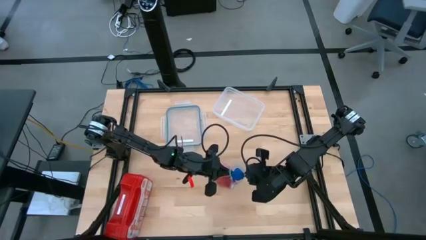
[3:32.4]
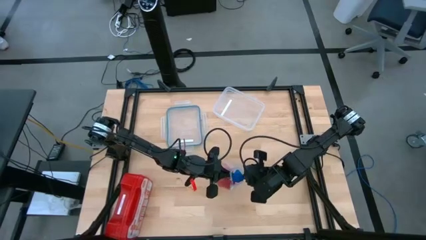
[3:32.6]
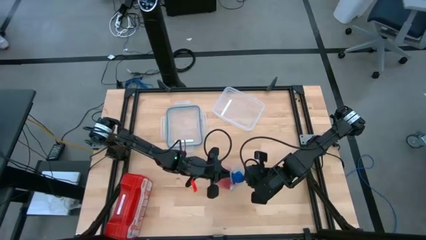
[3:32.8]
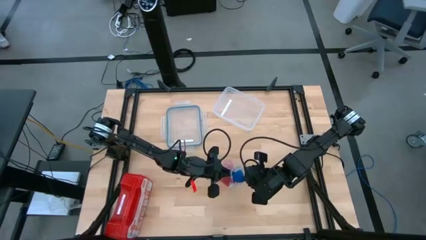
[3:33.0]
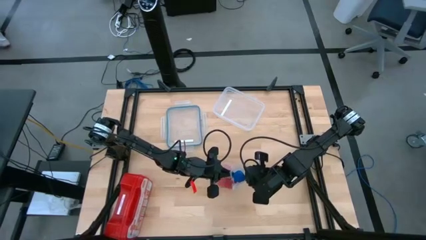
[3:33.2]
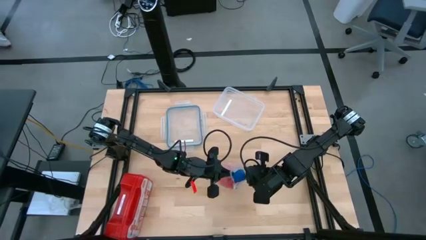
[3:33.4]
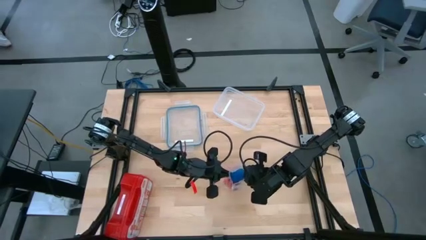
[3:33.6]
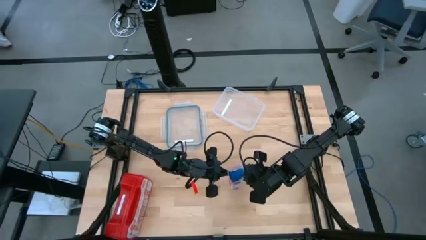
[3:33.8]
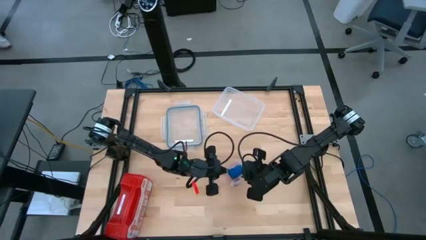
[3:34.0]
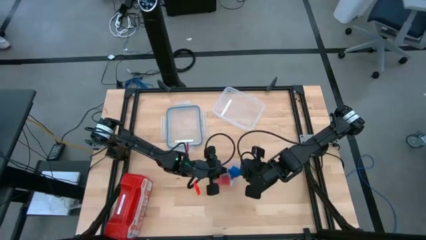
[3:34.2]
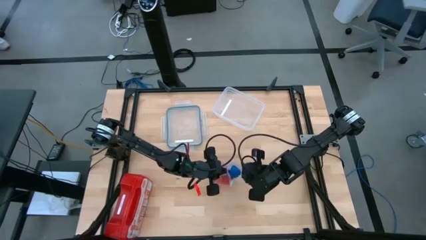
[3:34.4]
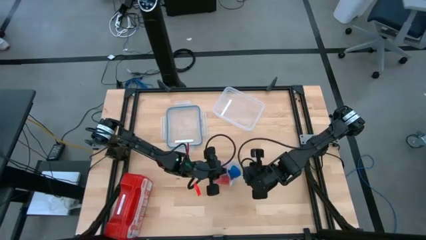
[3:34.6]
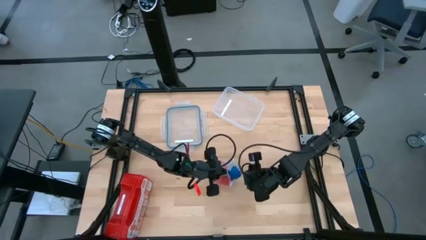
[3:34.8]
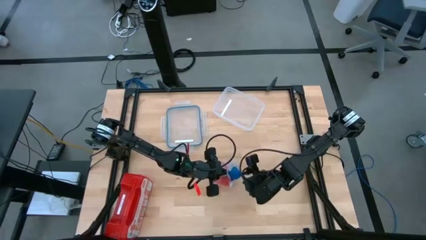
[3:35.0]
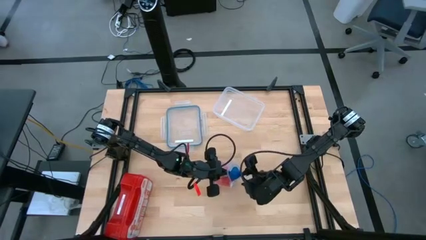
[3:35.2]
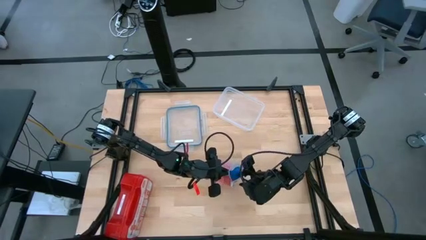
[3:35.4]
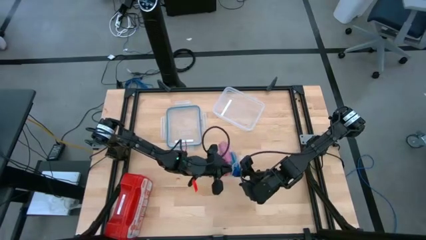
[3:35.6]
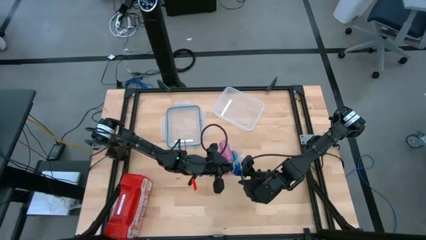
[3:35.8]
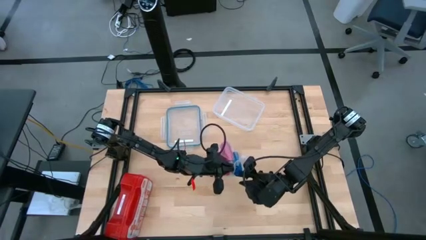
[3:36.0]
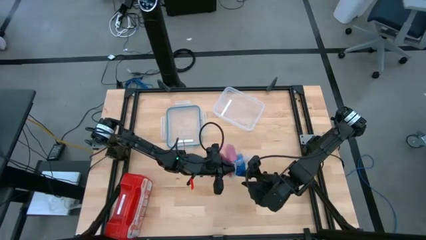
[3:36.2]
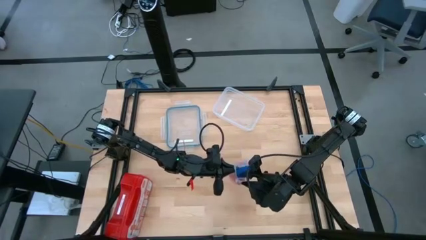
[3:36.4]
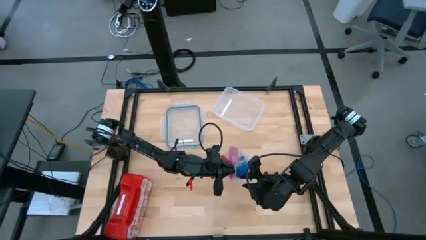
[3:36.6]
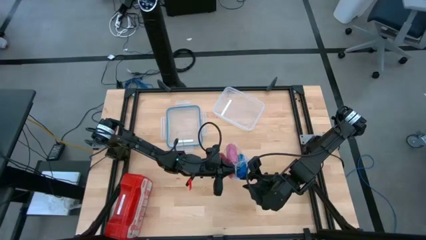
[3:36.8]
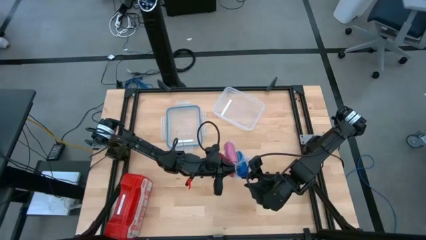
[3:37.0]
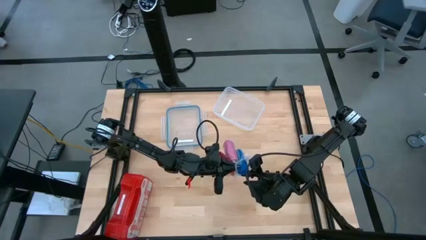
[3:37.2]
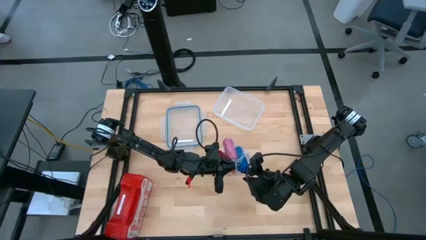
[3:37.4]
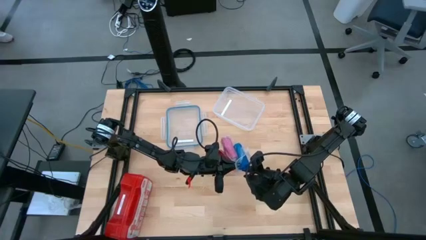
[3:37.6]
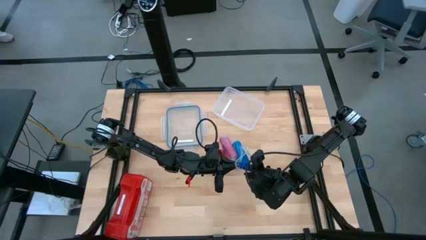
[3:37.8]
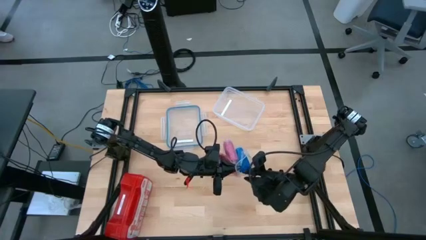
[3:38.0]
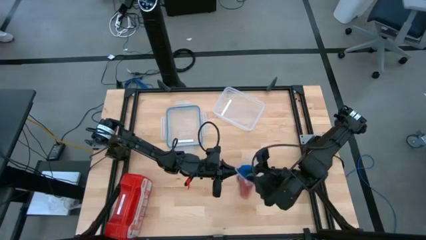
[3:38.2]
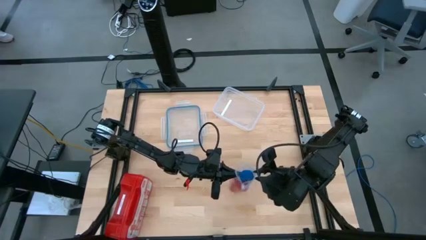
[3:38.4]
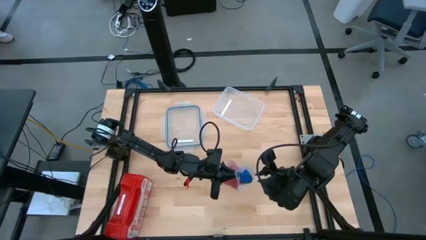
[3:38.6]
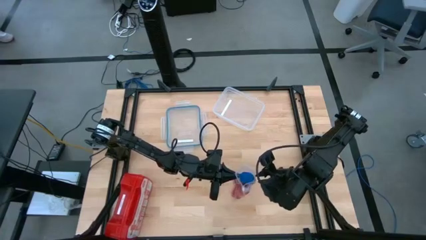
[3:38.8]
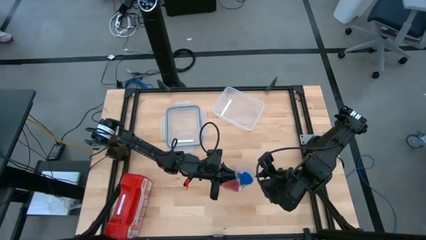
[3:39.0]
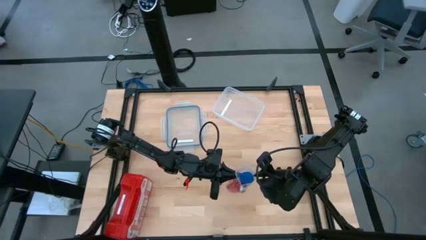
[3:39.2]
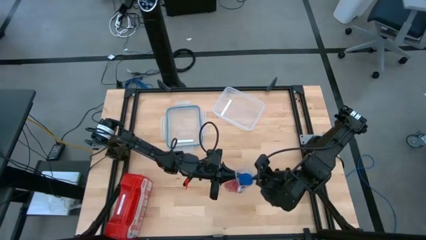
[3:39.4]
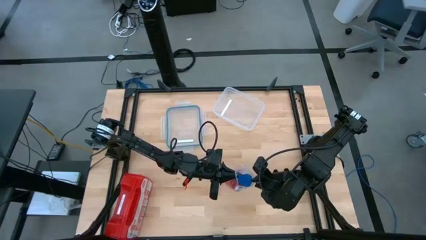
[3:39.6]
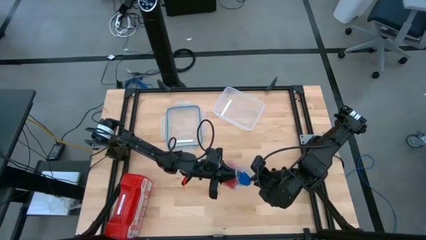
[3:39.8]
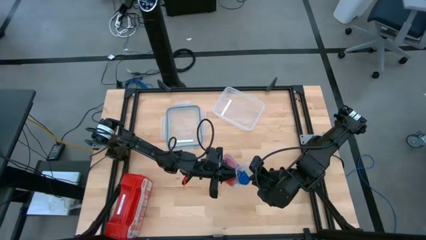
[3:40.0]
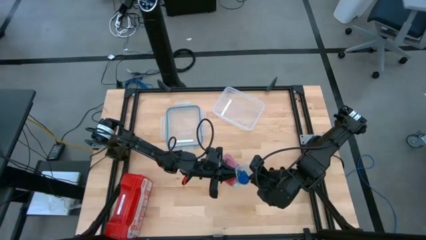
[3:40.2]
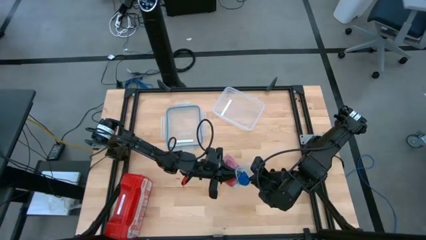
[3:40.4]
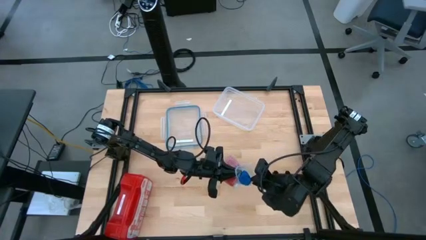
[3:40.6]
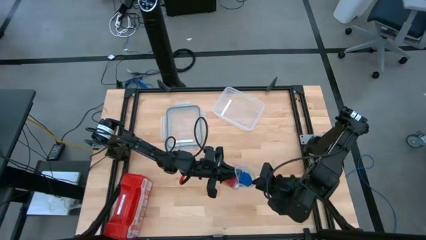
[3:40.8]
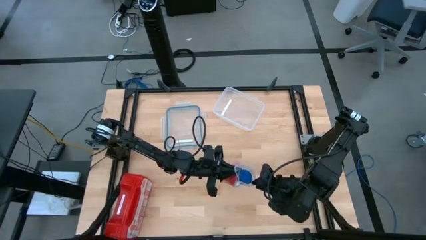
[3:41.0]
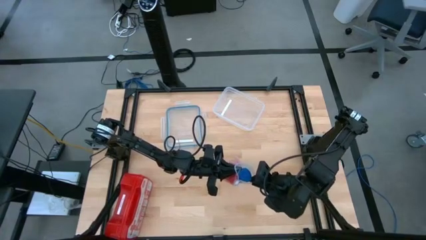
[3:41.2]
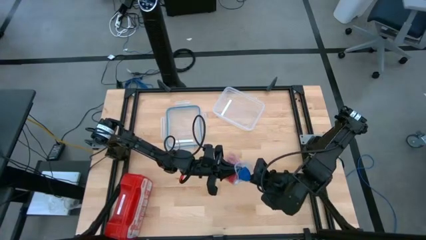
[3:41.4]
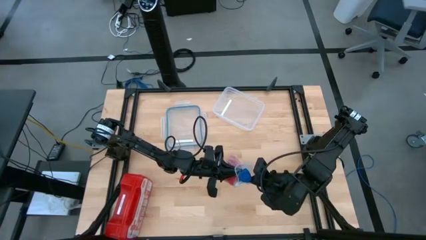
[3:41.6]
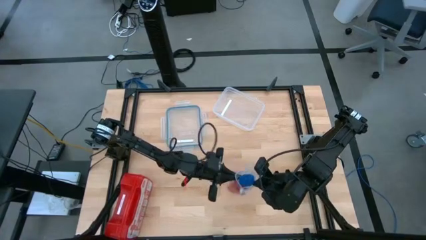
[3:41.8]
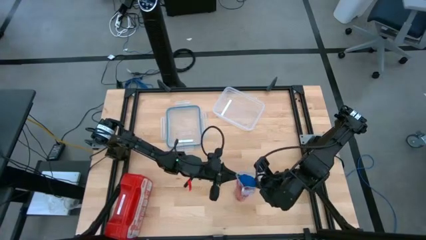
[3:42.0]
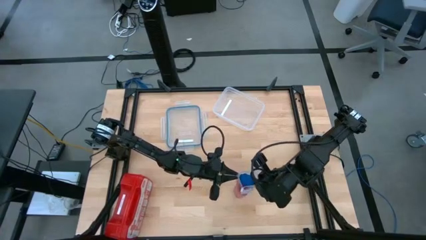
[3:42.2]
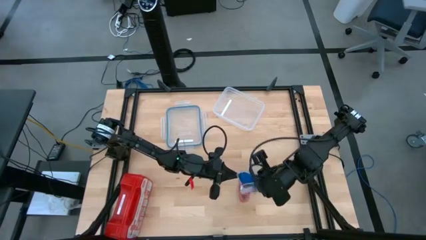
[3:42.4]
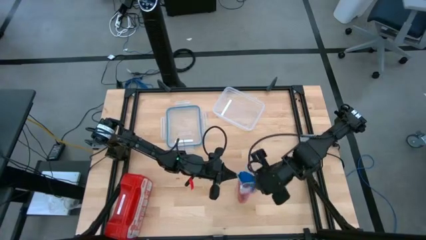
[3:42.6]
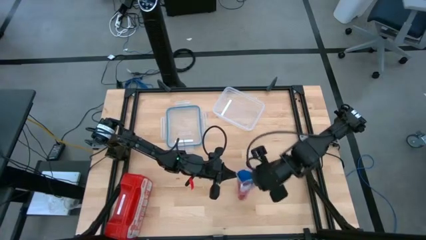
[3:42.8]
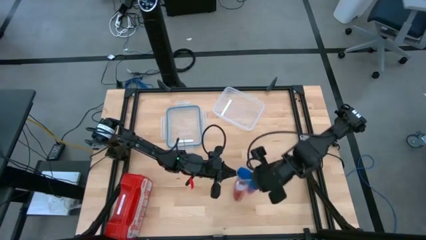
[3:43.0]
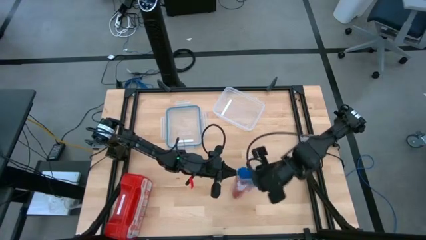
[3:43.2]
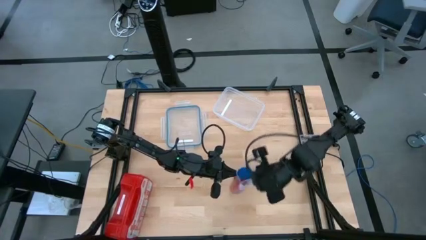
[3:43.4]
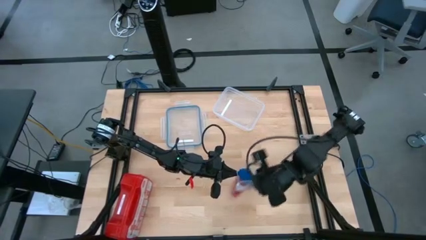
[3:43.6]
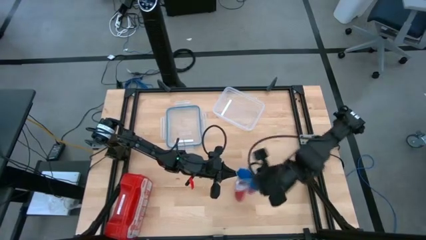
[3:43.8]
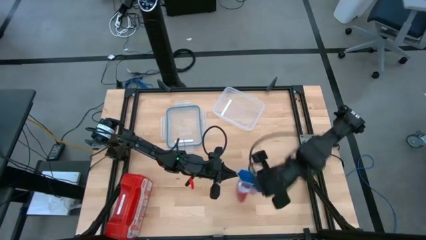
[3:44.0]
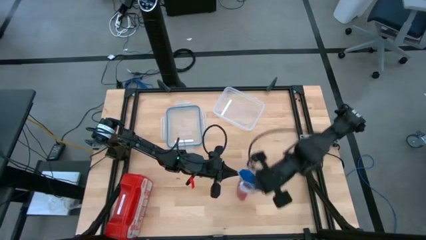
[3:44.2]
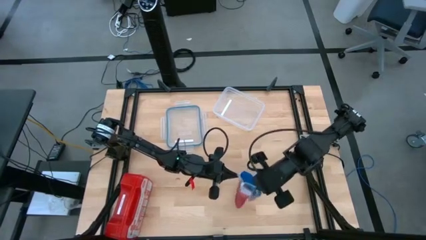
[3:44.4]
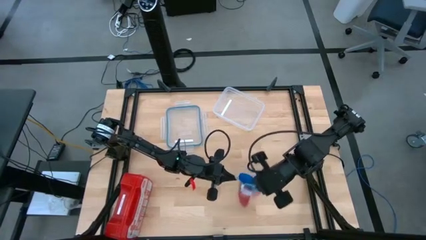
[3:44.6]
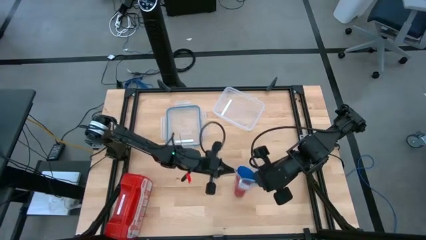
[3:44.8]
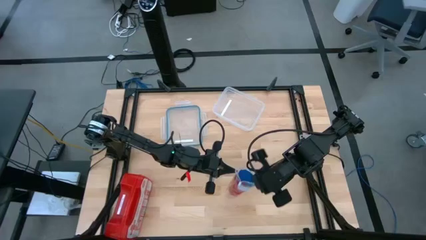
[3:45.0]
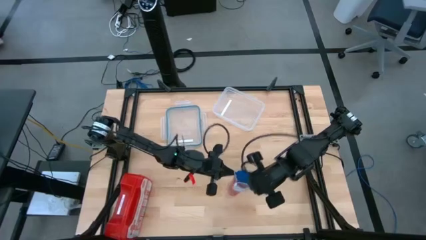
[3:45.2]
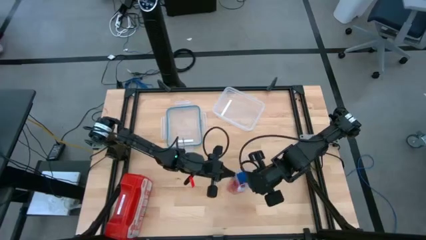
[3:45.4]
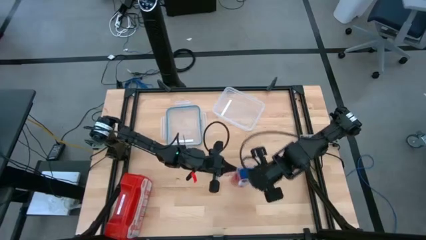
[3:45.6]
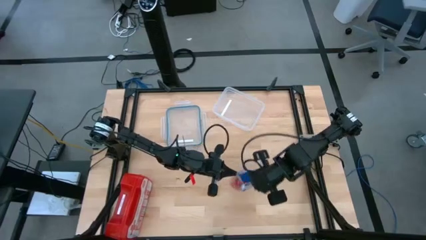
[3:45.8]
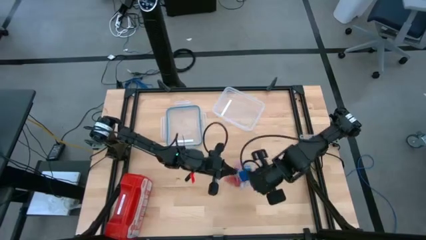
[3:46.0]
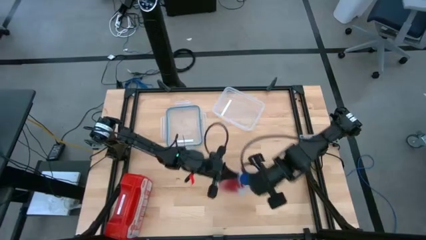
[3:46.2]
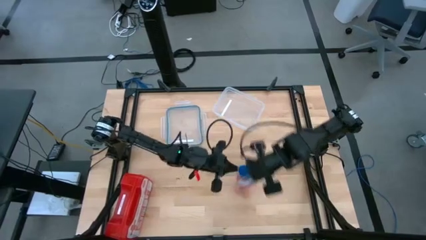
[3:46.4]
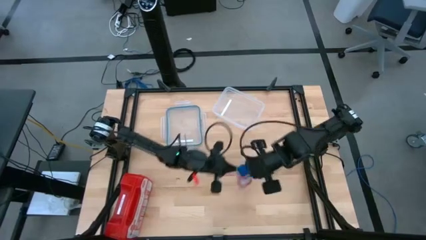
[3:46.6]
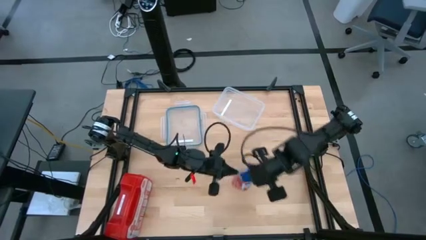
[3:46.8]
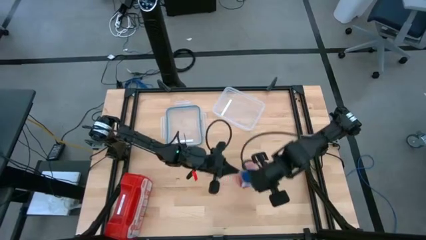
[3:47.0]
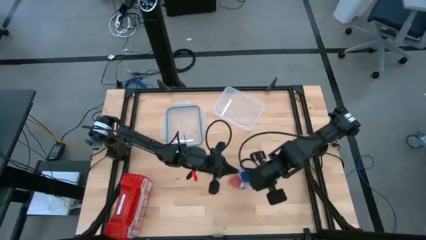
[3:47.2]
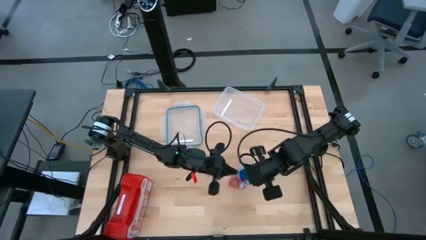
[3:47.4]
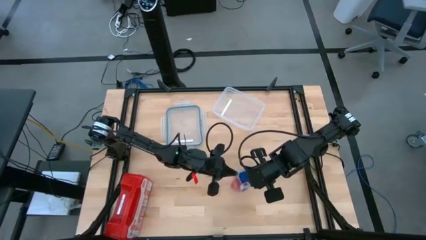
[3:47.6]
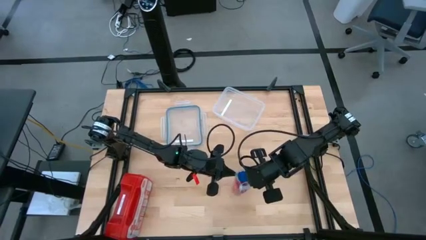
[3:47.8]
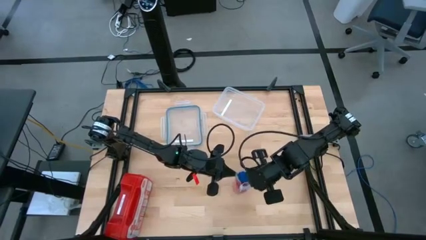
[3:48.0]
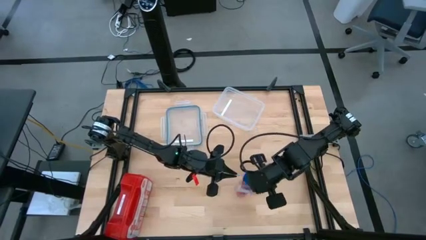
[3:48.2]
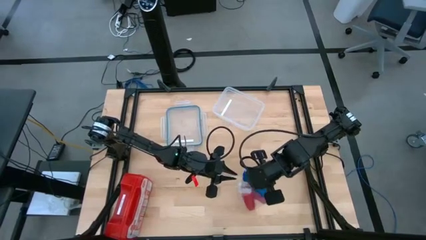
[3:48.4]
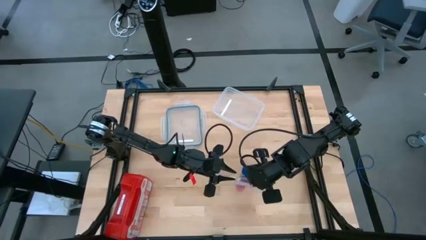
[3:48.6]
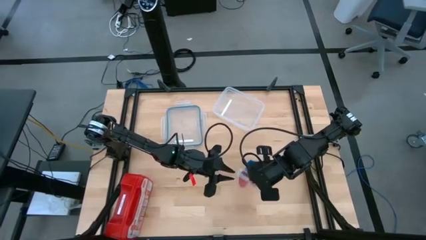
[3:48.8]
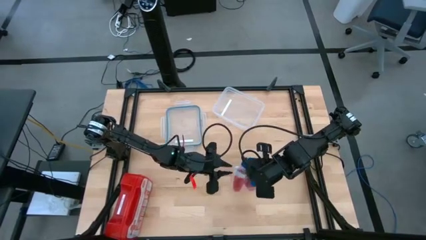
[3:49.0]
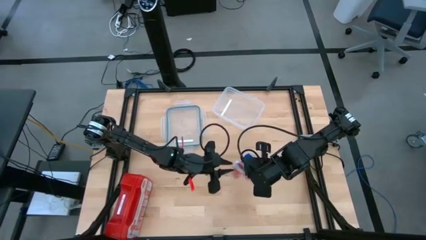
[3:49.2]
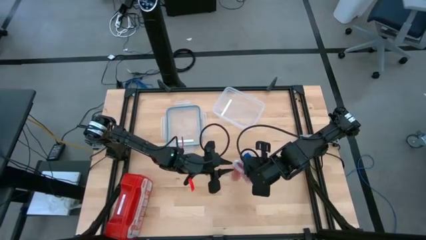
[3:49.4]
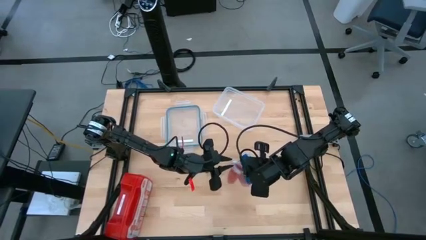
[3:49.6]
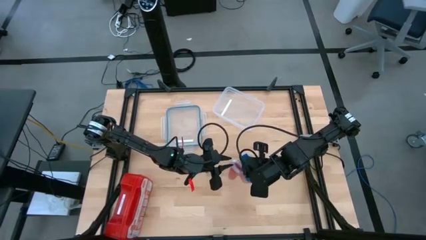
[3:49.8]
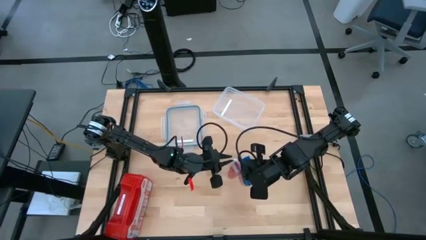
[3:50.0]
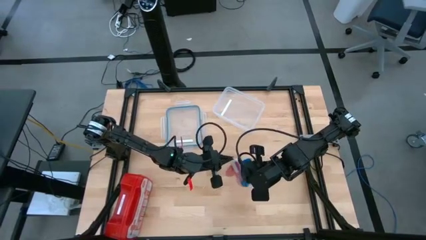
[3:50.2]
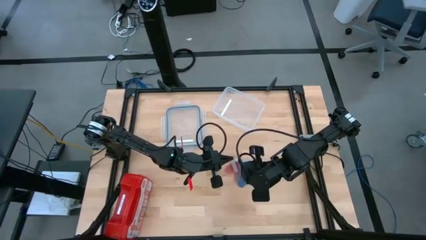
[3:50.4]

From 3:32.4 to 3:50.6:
Task: Roll bandage
Put the blue bandage into the transparent zip bag
